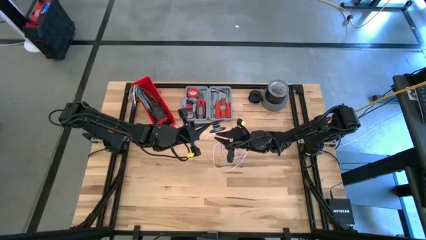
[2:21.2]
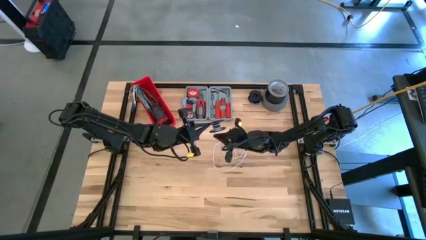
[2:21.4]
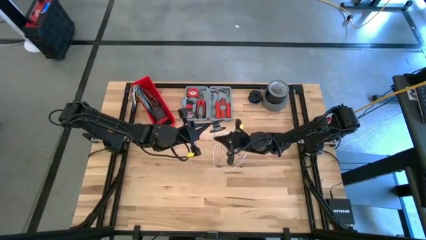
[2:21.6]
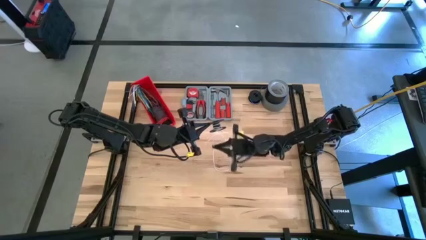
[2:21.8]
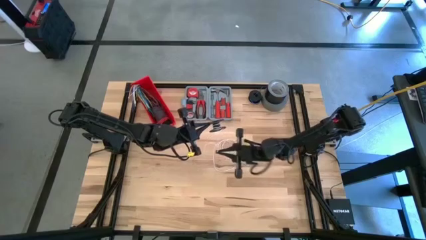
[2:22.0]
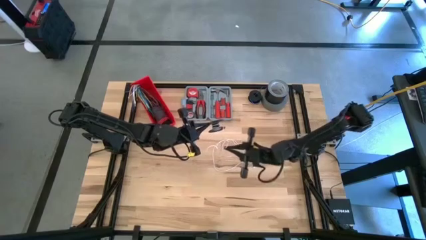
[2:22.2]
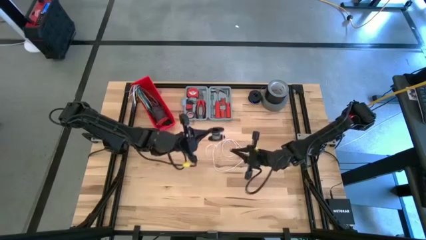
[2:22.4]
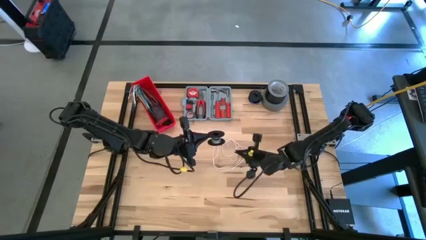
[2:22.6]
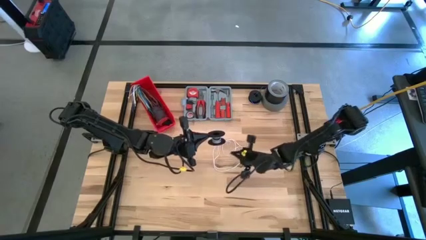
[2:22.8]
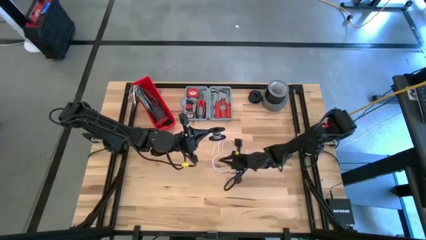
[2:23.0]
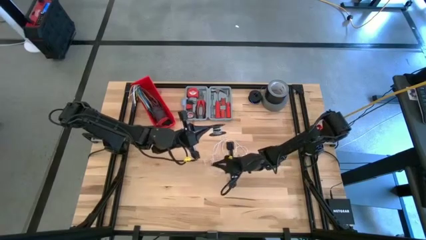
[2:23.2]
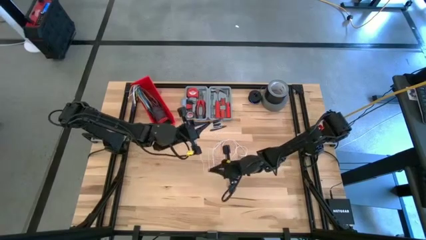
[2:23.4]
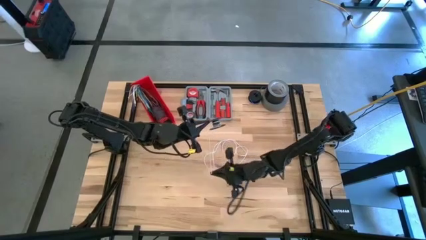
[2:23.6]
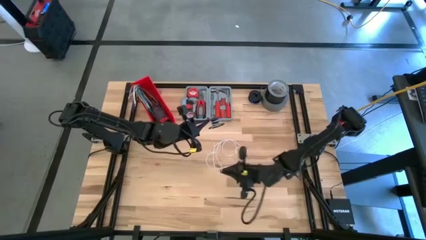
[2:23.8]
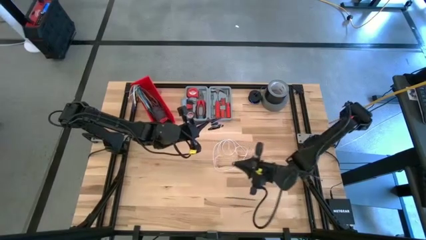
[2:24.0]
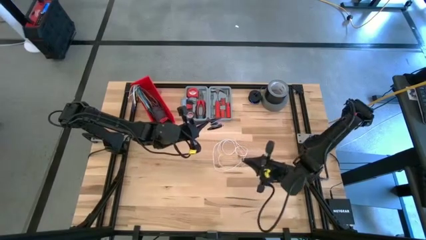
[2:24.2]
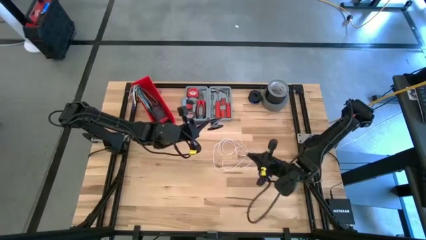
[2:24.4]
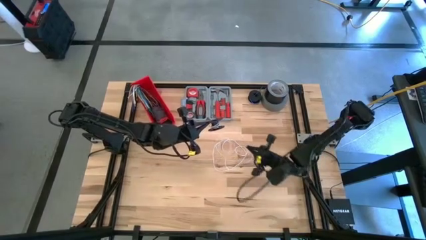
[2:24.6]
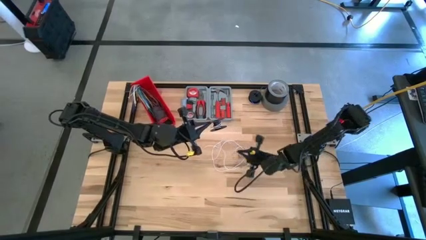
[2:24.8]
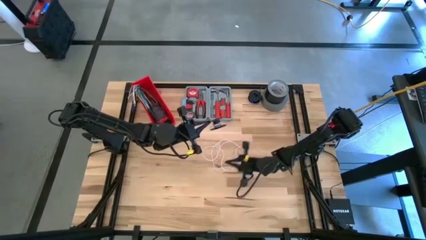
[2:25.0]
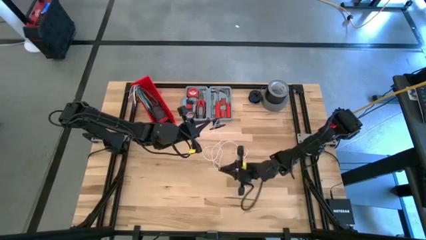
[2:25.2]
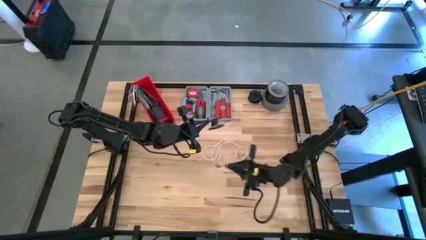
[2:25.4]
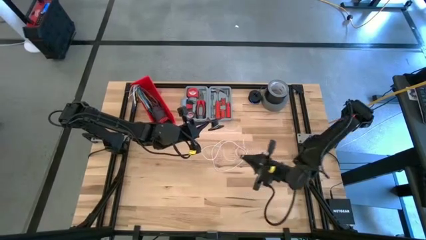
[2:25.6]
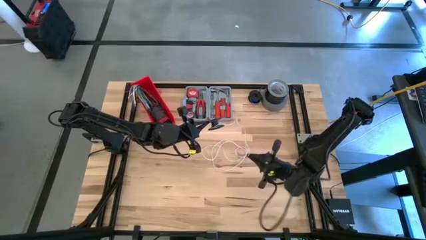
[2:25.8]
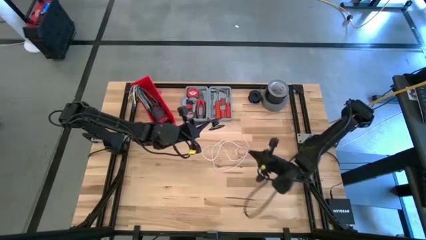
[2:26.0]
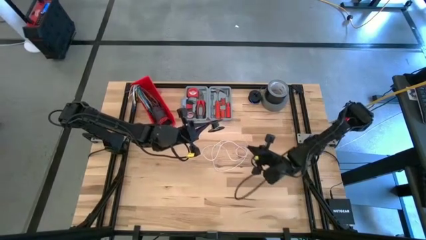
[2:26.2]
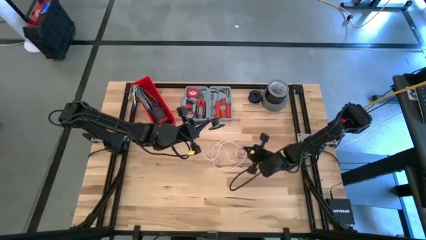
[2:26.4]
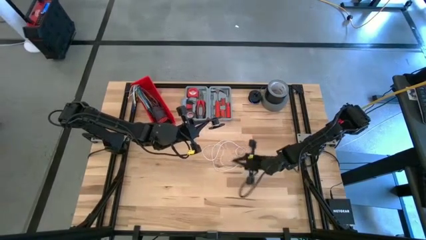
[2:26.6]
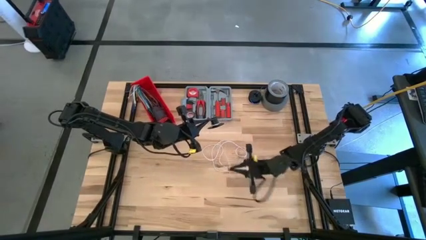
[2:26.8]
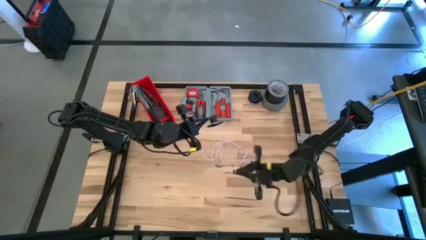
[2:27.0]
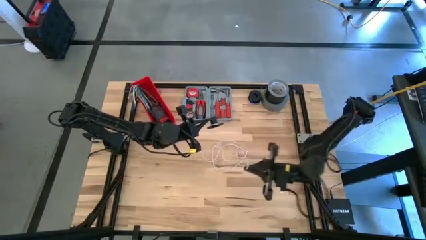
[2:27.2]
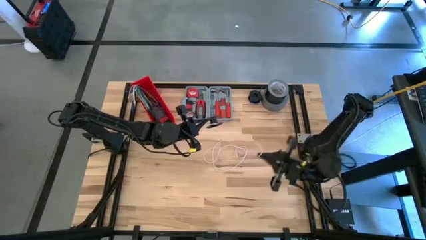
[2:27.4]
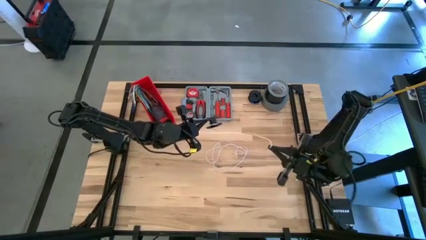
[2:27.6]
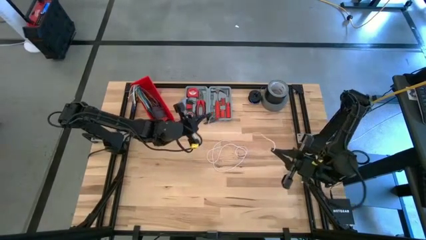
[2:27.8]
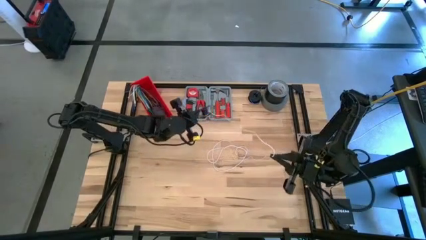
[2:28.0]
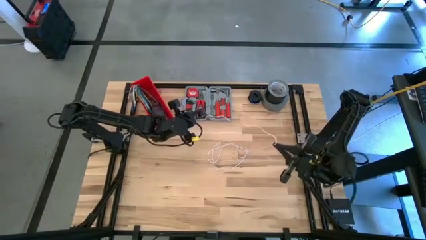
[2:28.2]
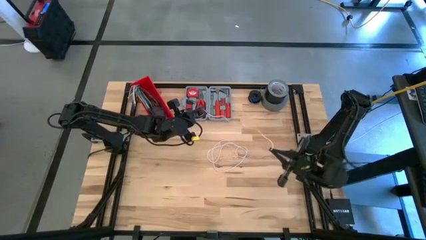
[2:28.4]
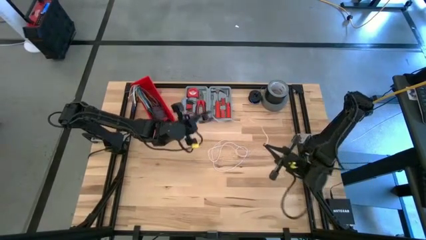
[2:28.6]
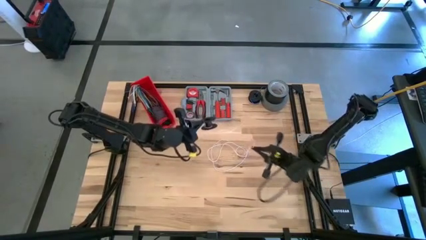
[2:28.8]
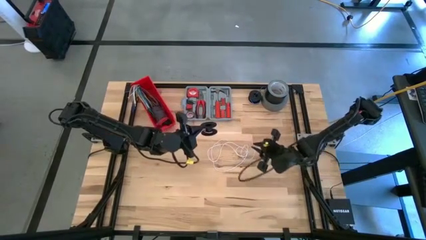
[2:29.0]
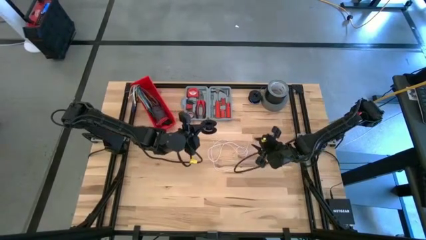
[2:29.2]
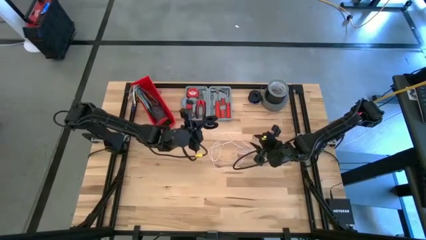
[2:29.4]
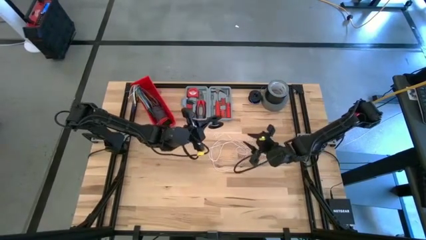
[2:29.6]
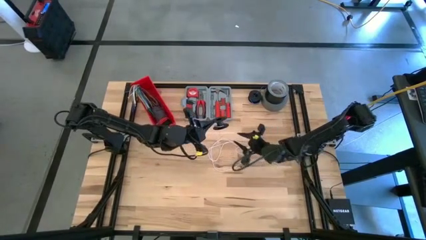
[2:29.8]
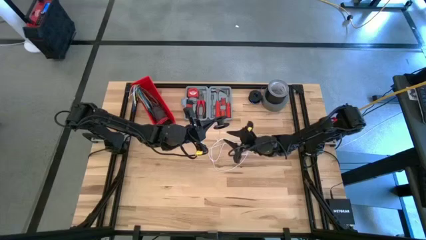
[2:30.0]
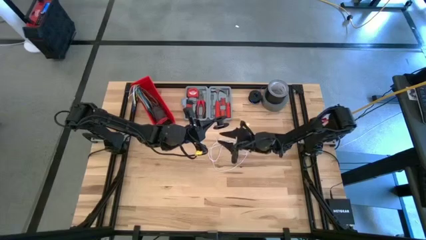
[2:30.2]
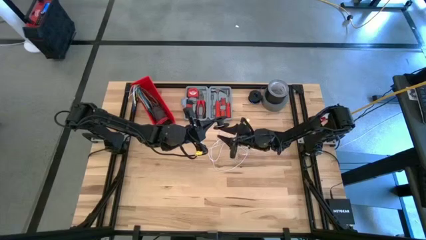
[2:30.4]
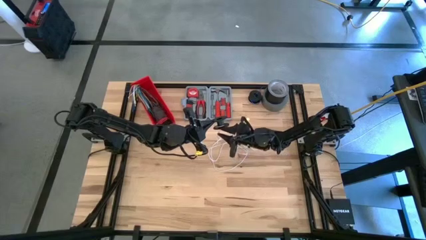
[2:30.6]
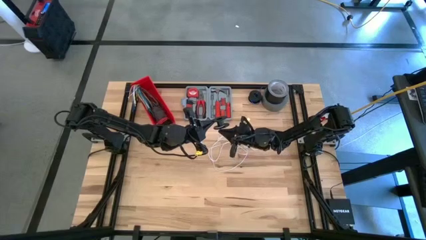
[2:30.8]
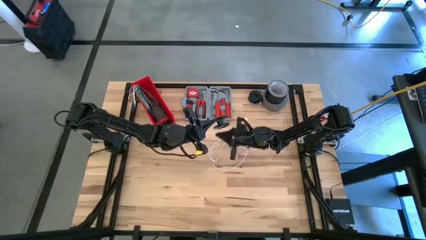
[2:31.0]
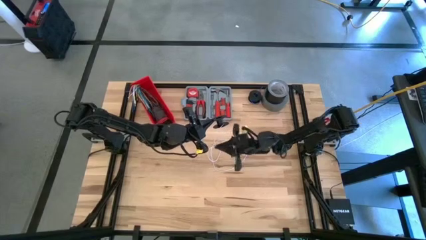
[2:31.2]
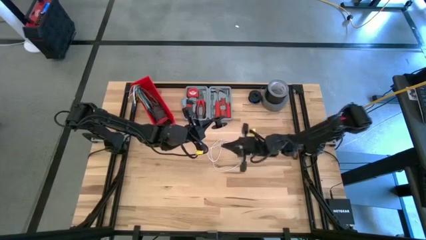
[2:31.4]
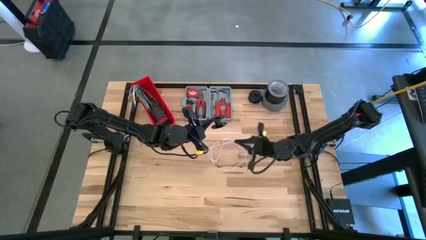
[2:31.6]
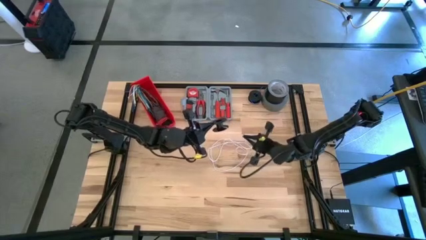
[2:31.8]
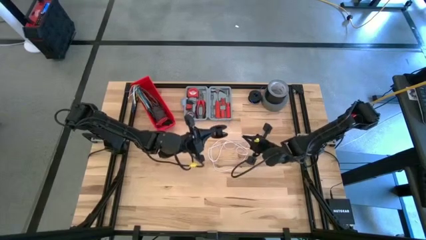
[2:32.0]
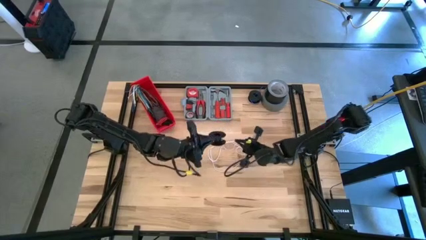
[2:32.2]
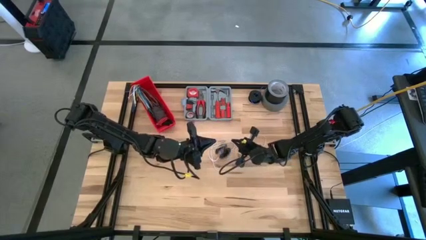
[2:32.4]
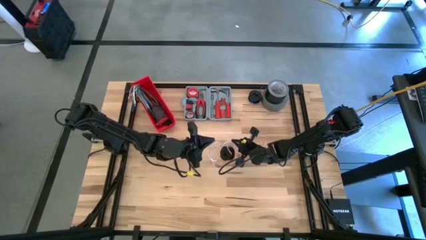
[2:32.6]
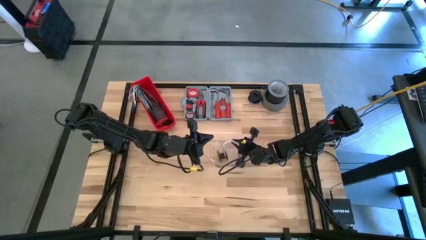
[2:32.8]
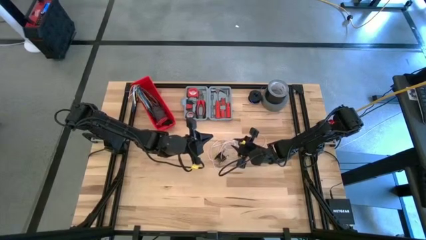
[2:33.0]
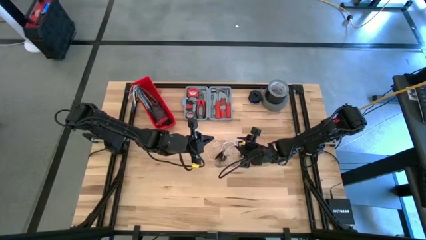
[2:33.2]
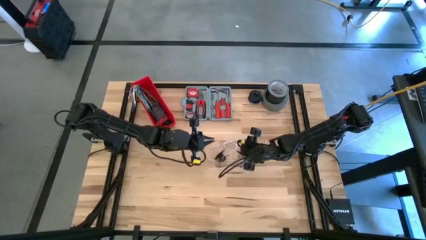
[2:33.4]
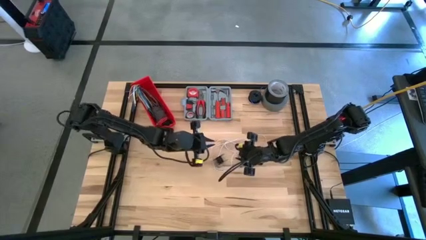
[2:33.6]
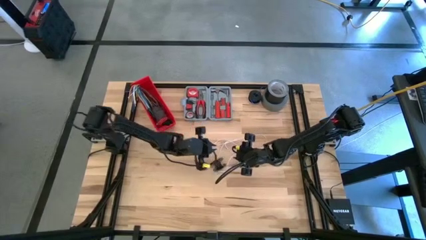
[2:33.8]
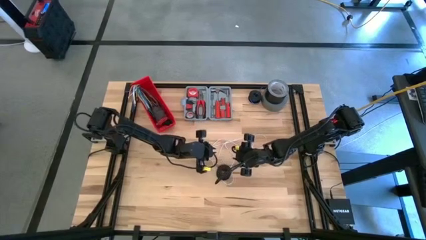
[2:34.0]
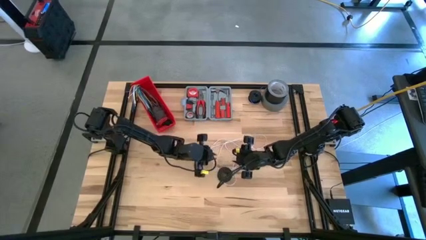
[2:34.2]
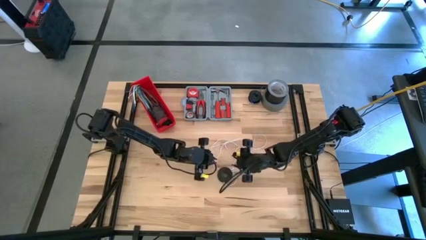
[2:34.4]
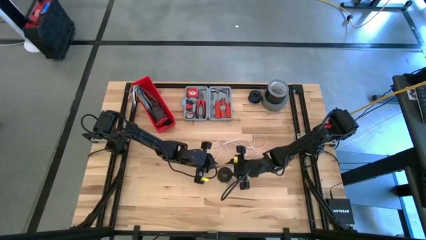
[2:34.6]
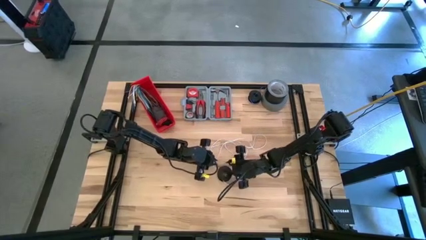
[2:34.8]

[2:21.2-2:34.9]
Task: Coil cords
Uncoil the white wire from the spool
